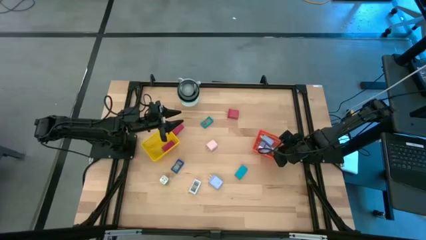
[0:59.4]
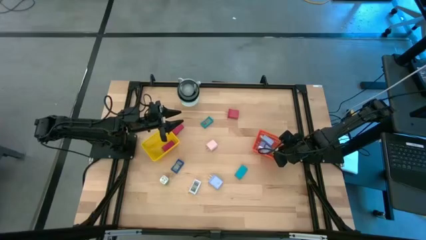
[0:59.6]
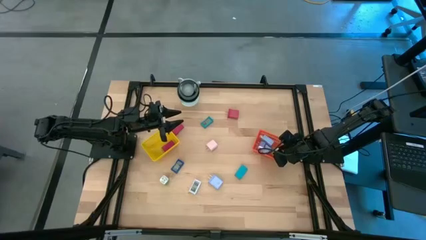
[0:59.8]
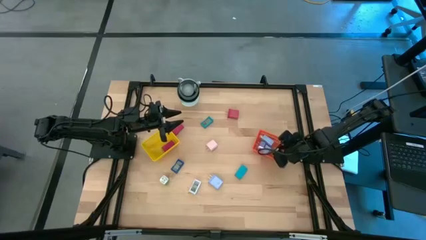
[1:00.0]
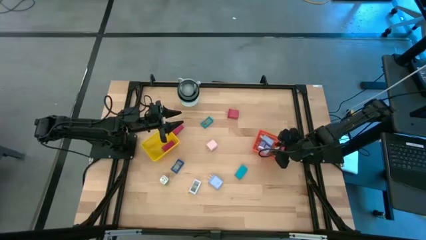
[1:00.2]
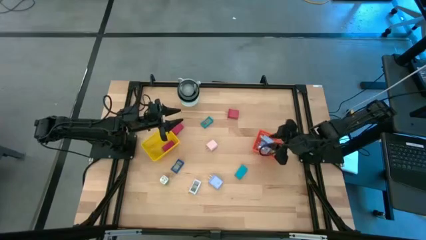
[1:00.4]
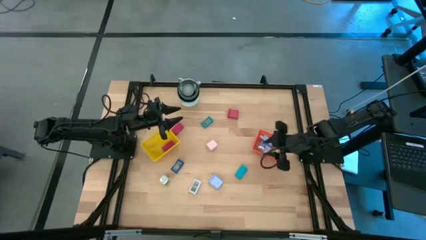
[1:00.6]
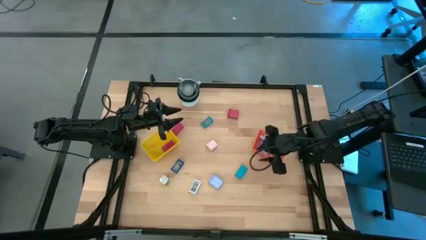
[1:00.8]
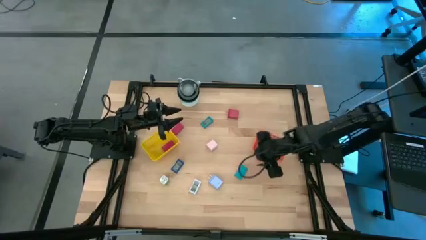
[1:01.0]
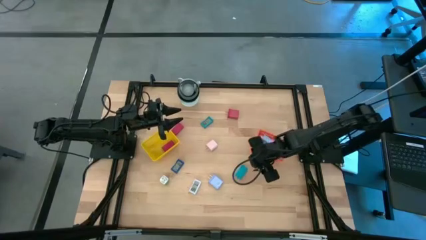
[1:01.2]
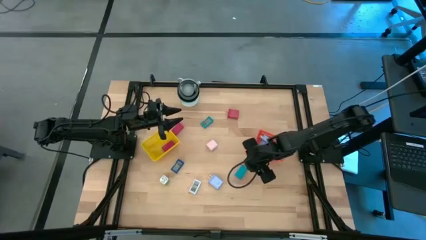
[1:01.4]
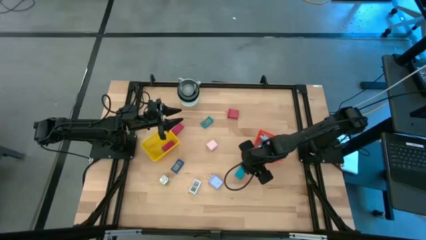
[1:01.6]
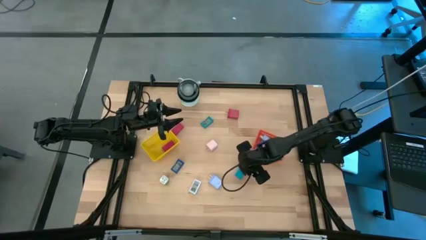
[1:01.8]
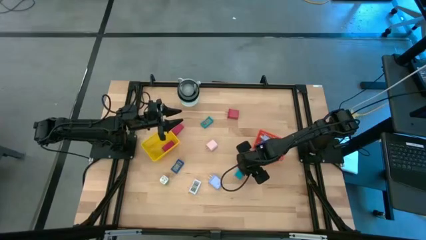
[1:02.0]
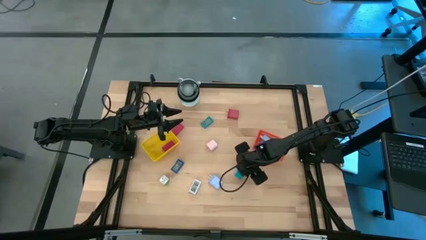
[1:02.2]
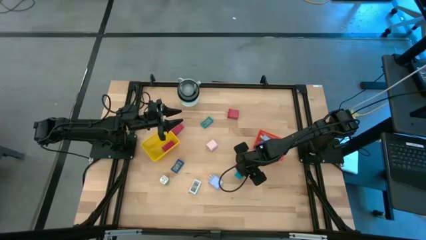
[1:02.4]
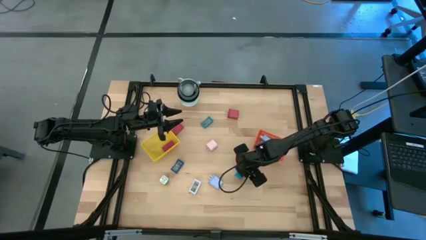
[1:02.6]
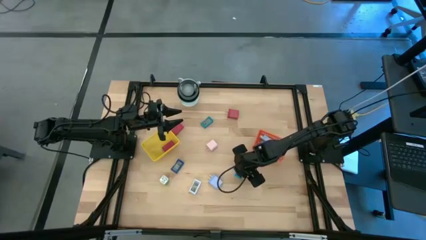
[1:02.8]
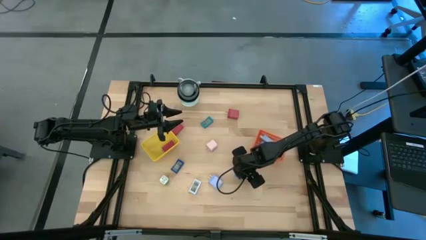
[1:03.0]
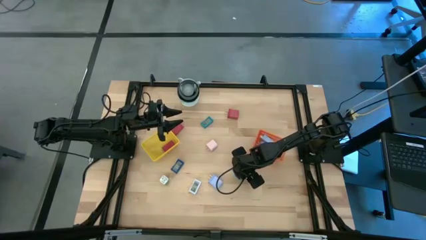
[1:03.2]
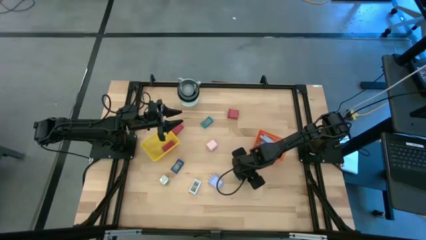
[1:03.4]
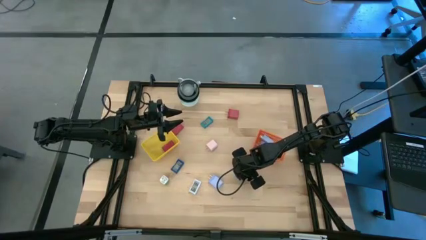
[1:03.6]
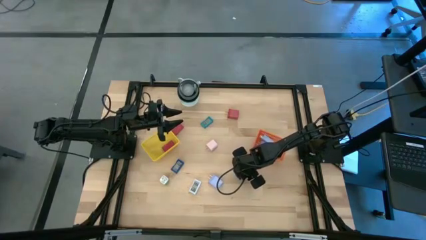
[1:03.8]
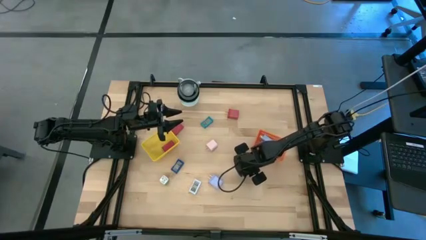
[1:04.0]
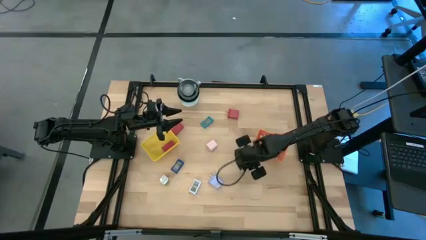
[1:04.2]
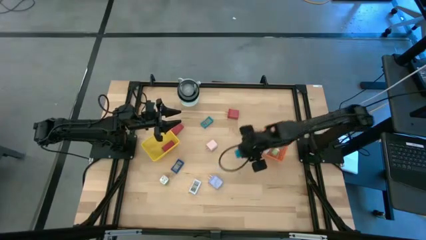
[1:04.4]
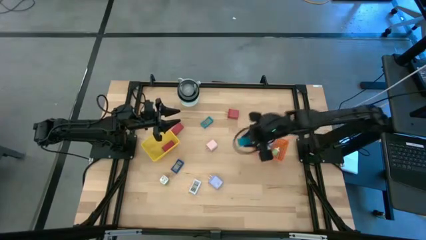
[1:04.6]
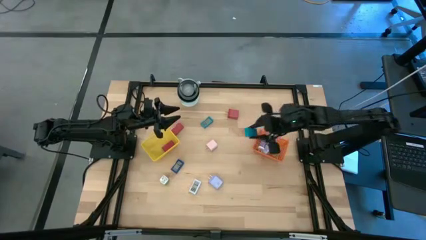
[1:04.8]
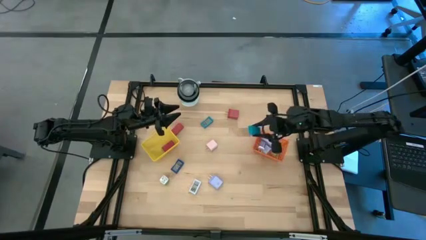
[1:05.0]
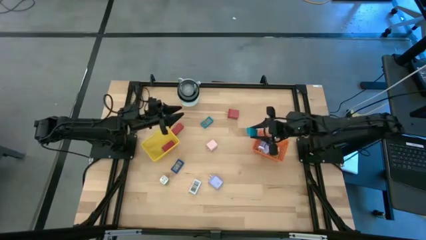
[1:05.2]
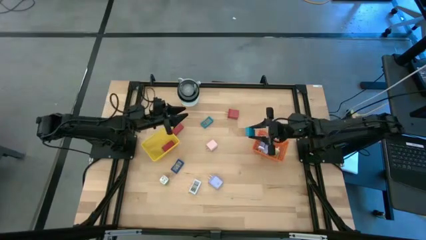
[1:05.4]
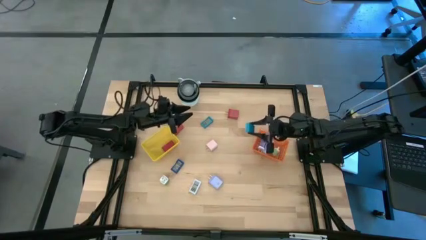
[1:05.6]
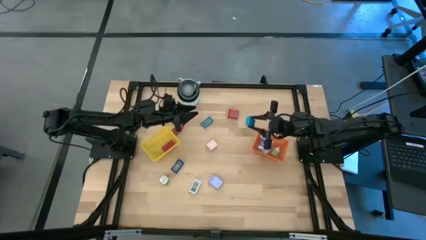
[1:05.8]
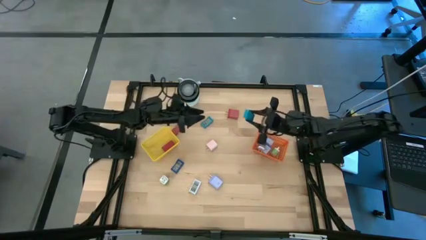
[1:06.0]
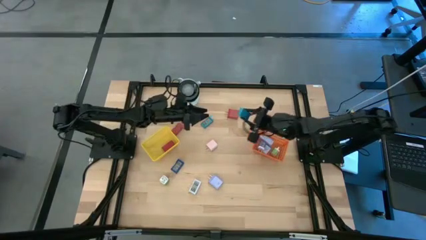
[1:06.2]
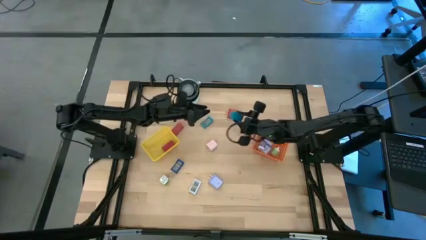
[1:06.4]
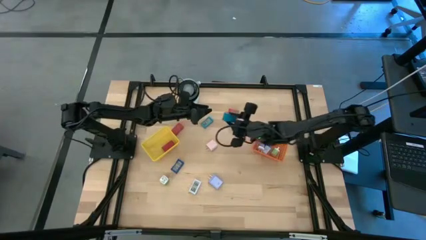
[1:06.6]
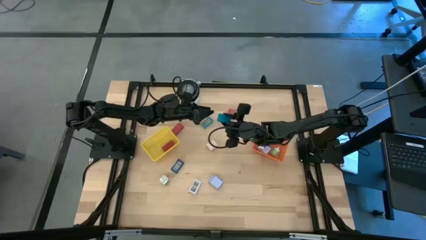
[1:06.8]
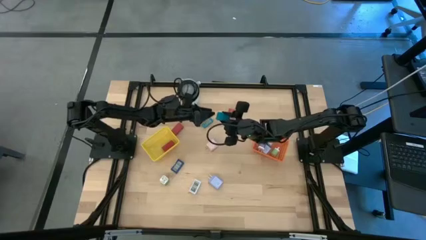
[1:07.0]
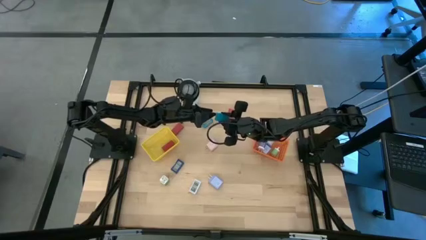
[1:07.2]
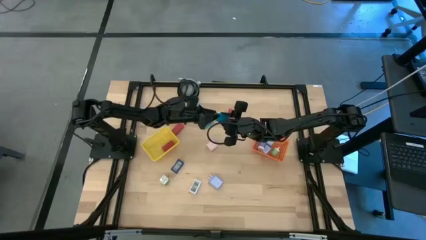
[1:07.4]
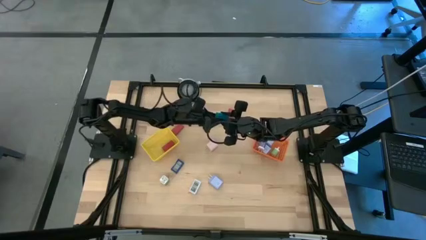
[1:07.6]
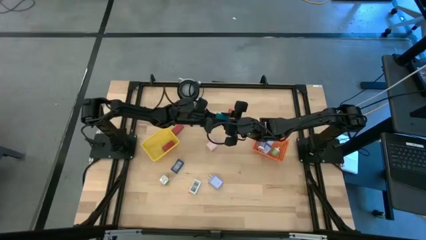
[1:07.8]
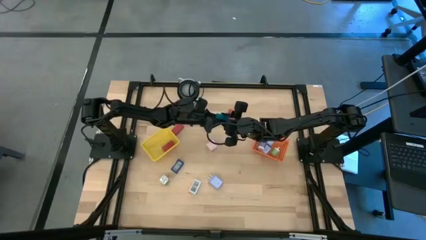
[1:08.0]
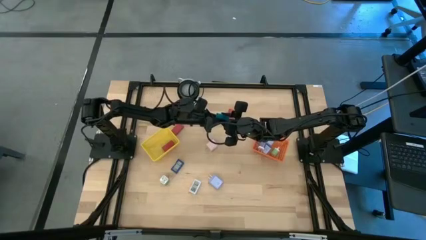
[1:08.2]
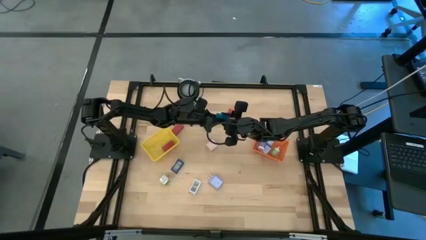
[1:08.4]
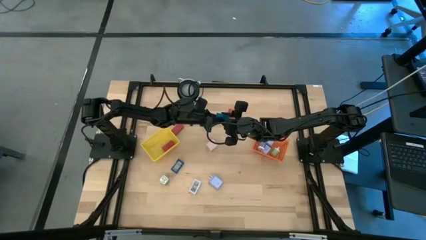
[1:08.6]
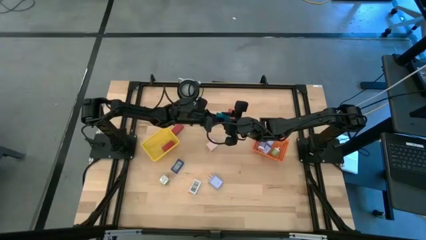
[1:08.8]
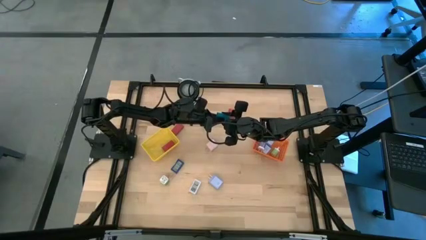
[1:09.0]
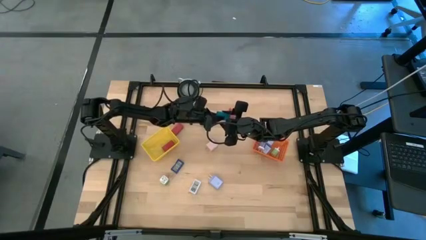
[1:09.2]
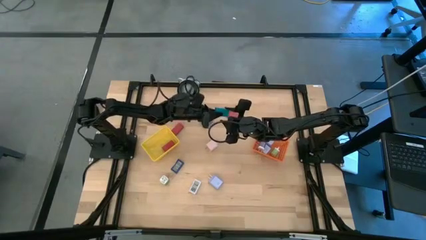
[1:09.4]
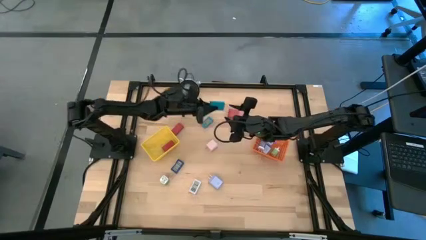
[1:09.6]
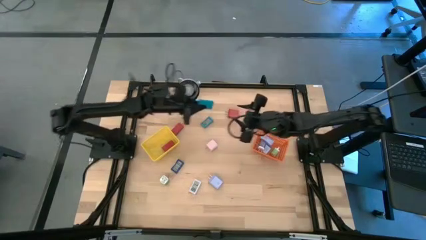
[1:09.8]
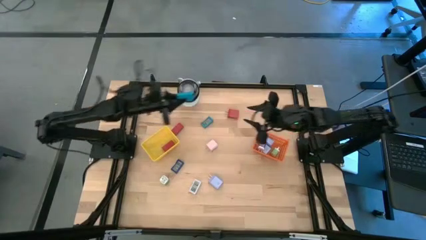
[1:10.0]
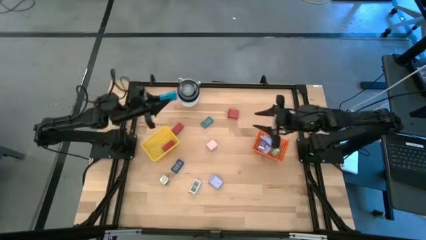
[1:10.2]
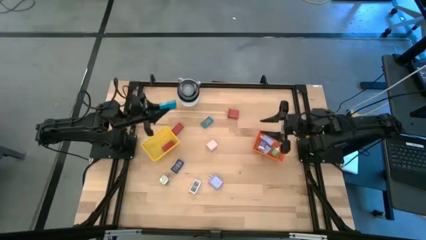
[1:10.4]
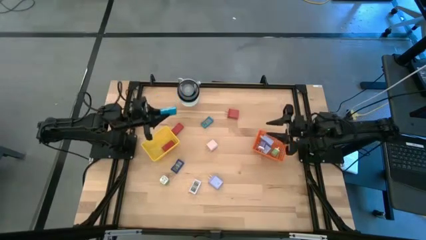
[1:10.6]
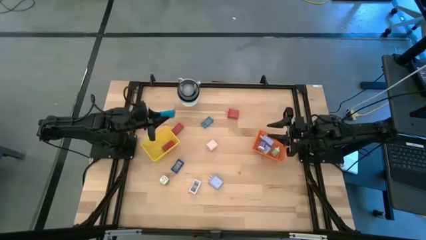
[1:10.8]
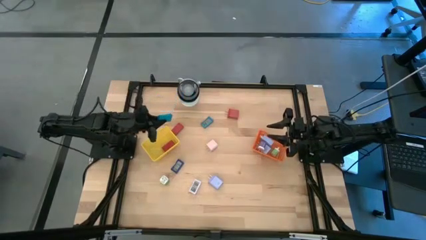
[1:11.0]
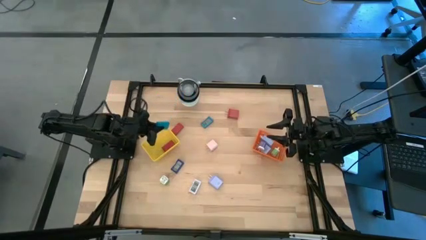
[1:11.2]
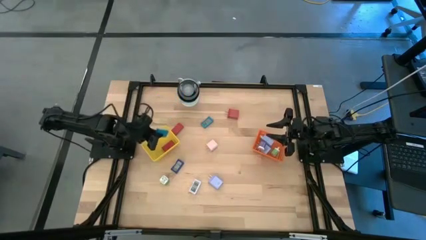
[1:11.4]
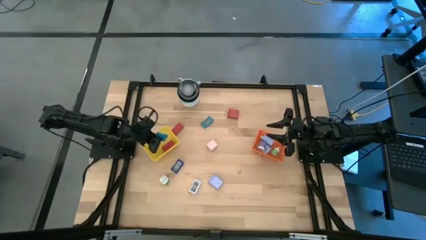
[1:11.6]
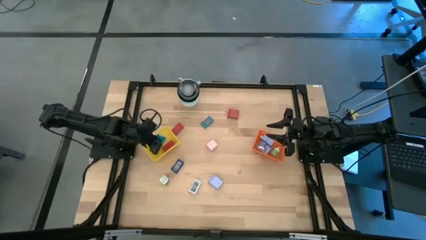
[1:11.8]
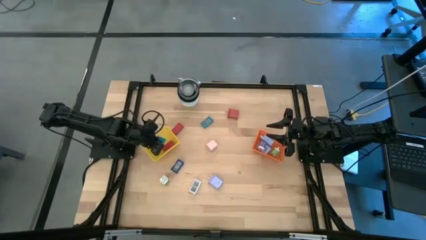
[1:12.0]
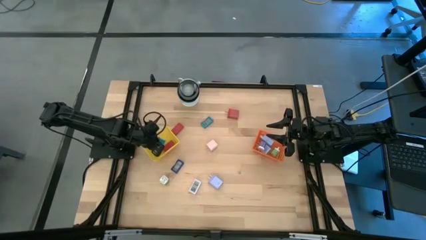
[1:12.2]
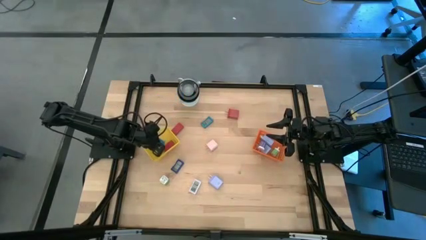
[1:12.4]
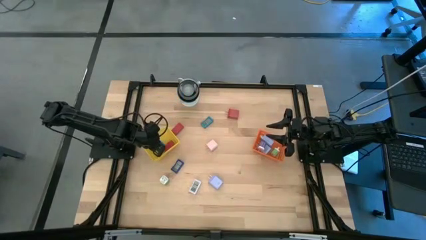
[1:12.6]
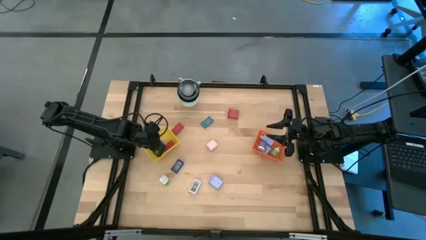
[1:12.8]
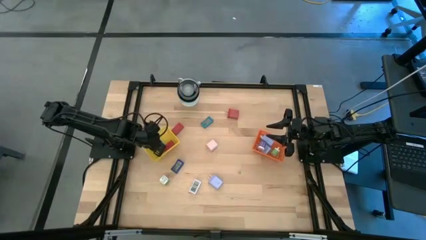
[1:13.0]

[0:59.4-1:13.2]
Task: Pick & Place Office items
Put the bottom blue digital timer into the yellow basket
